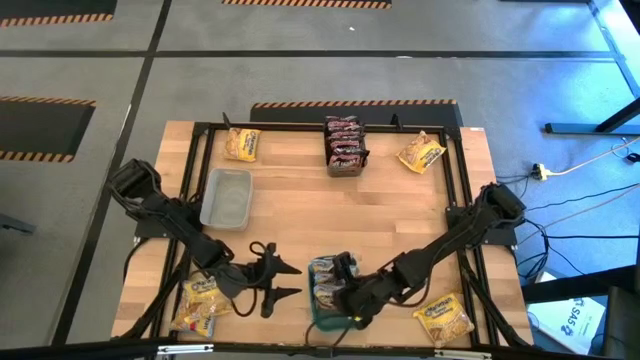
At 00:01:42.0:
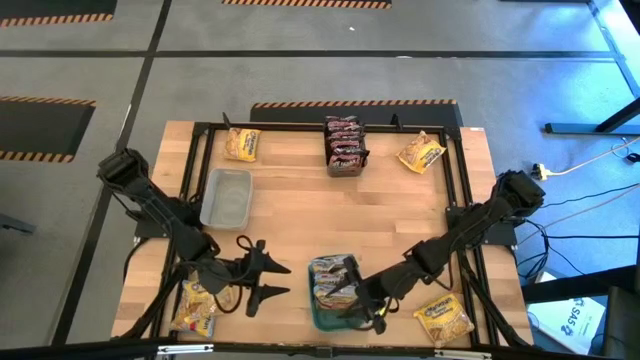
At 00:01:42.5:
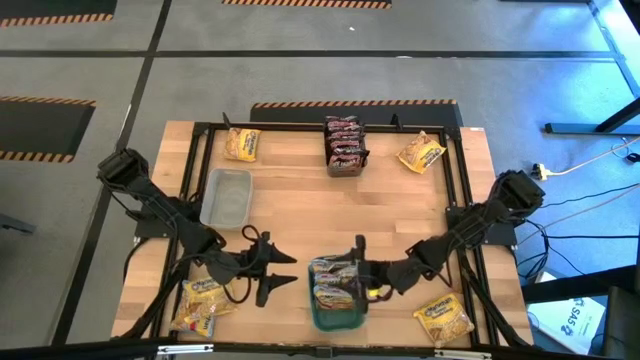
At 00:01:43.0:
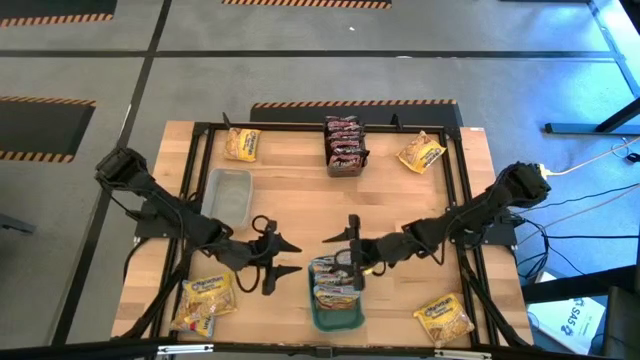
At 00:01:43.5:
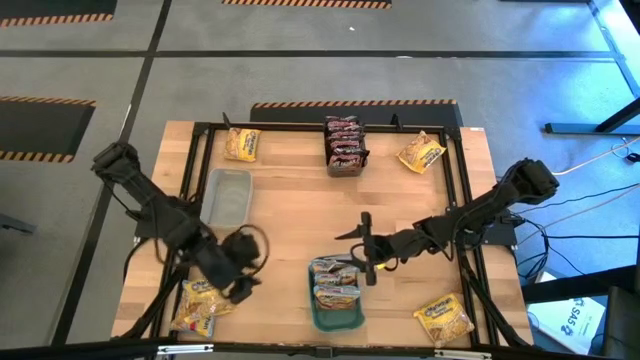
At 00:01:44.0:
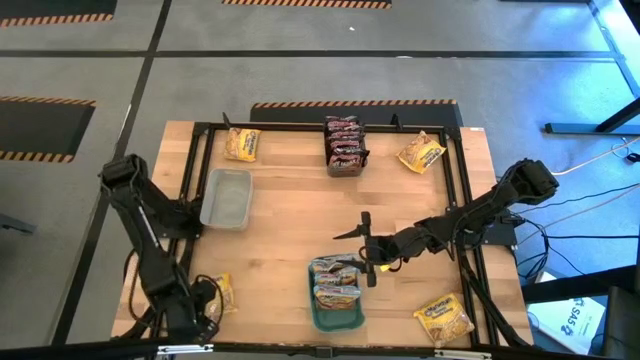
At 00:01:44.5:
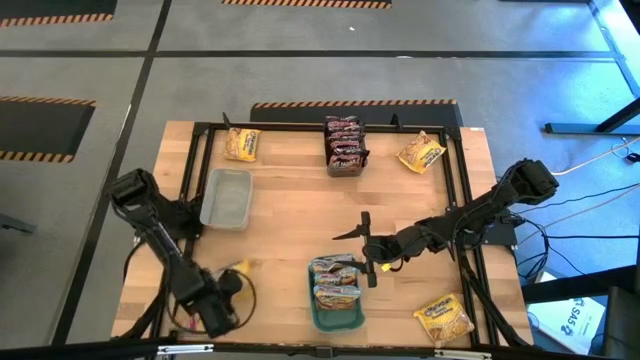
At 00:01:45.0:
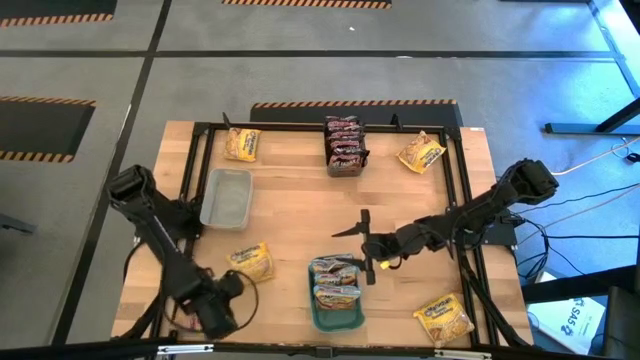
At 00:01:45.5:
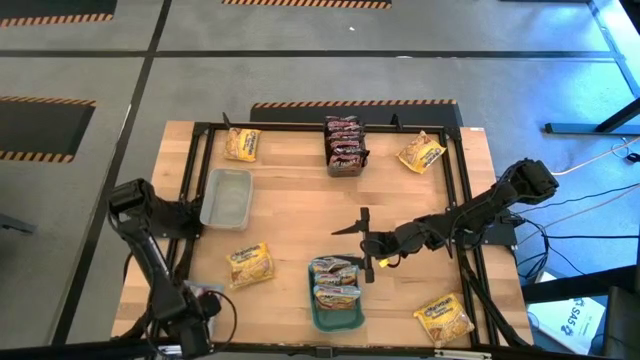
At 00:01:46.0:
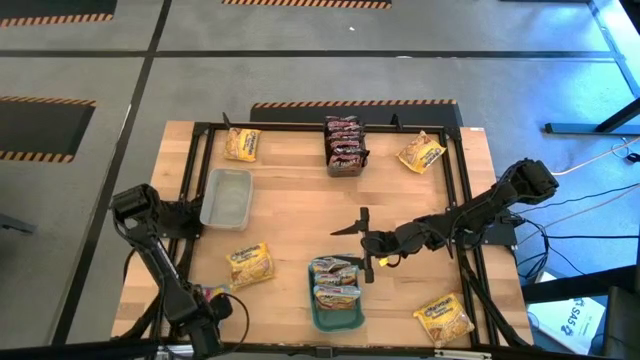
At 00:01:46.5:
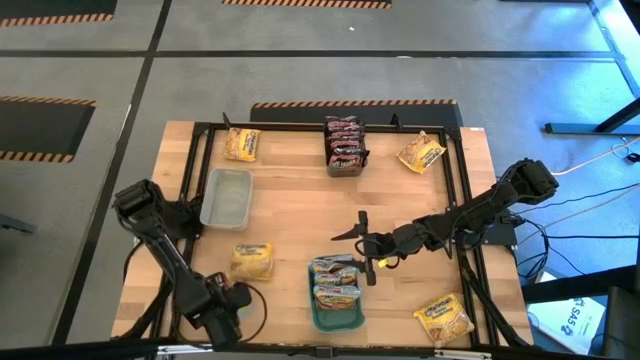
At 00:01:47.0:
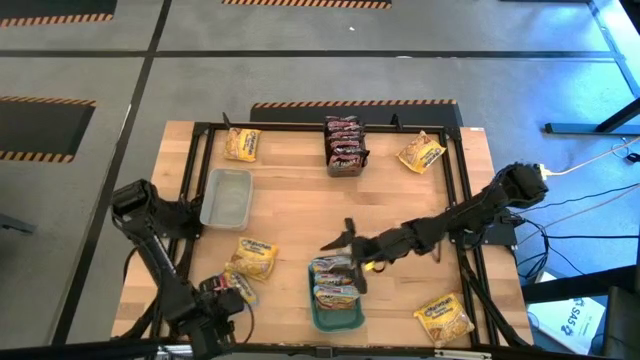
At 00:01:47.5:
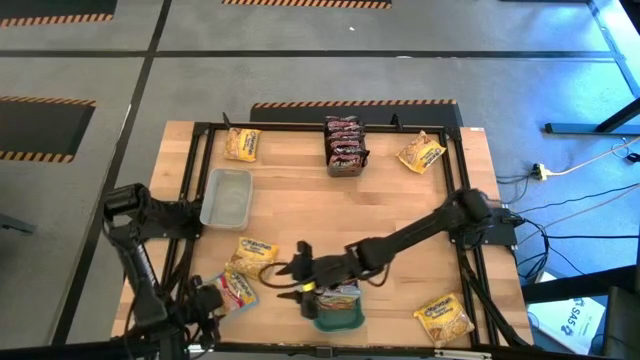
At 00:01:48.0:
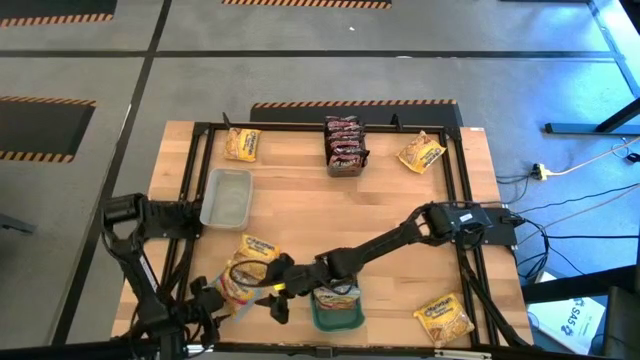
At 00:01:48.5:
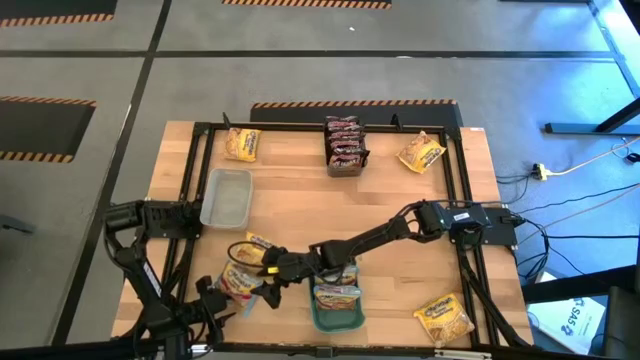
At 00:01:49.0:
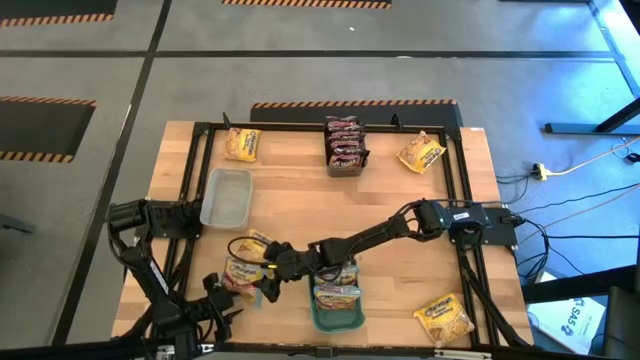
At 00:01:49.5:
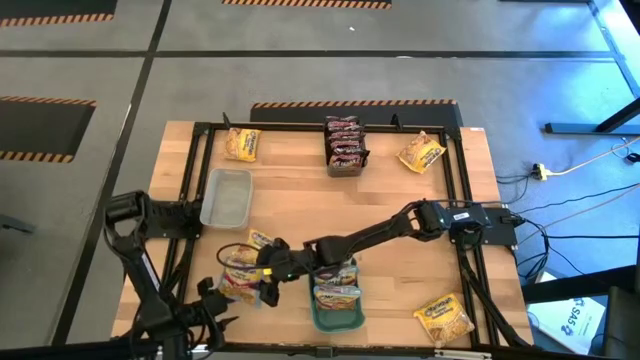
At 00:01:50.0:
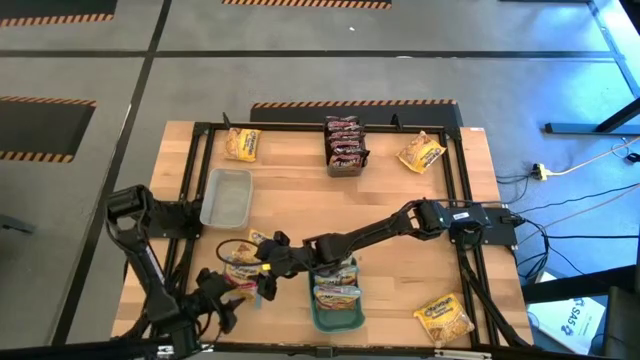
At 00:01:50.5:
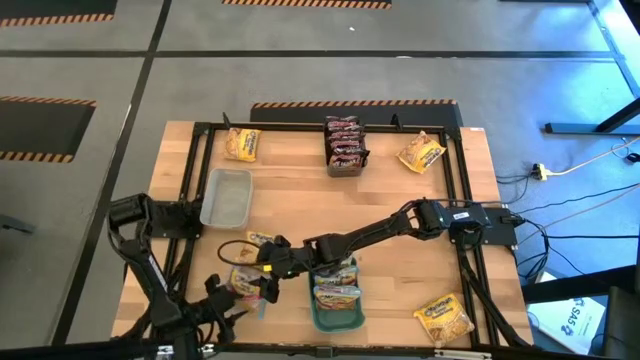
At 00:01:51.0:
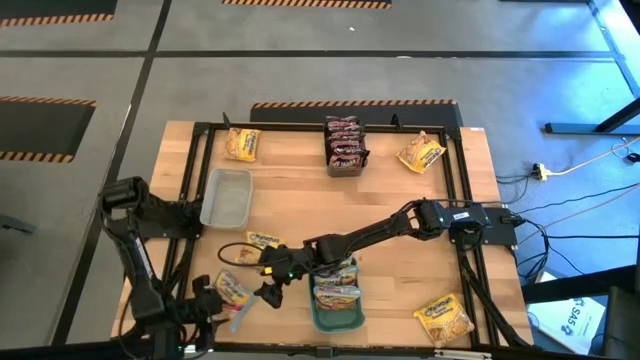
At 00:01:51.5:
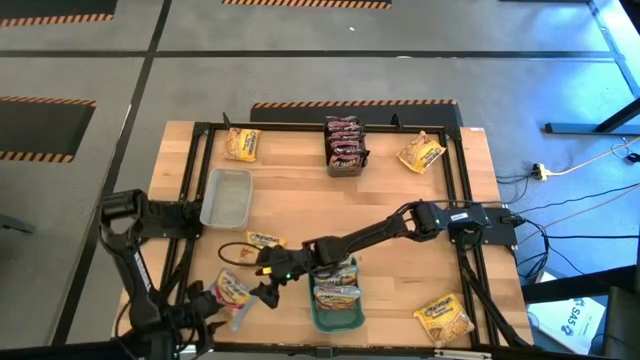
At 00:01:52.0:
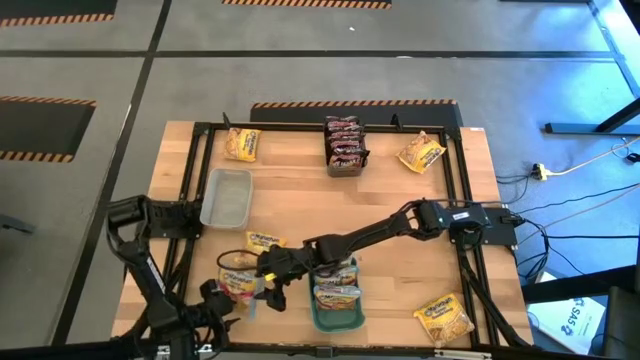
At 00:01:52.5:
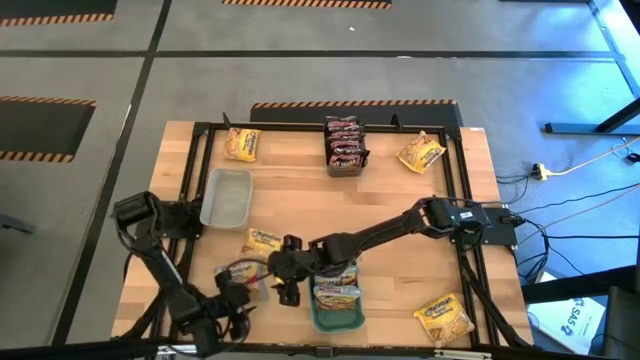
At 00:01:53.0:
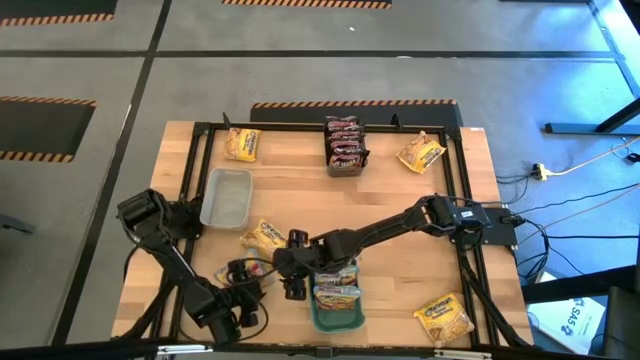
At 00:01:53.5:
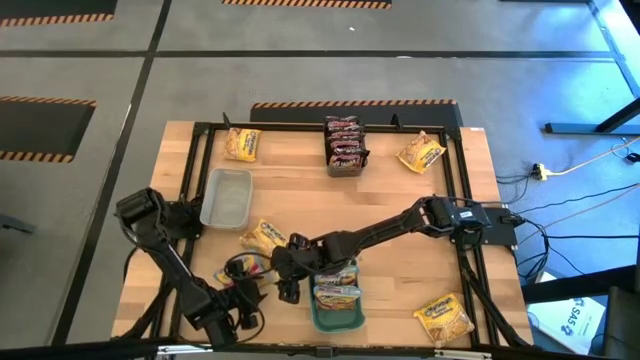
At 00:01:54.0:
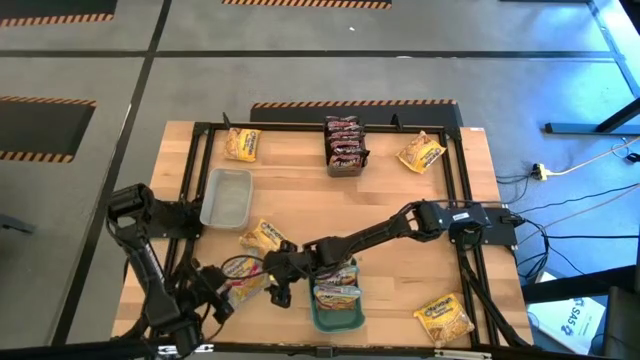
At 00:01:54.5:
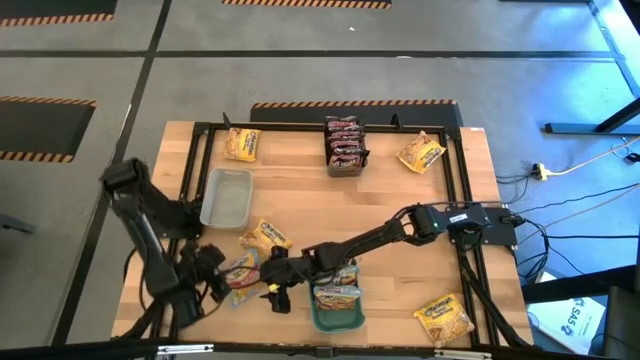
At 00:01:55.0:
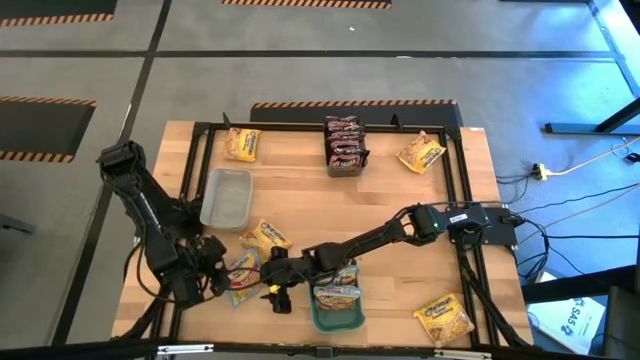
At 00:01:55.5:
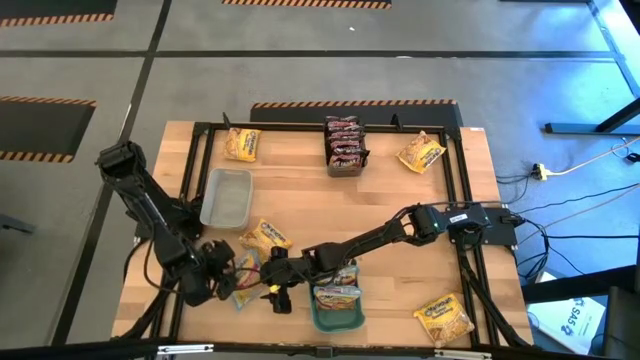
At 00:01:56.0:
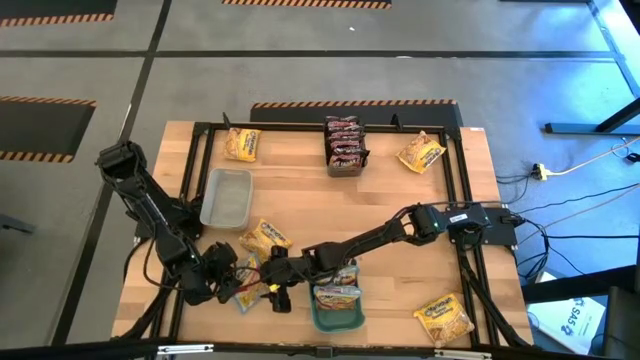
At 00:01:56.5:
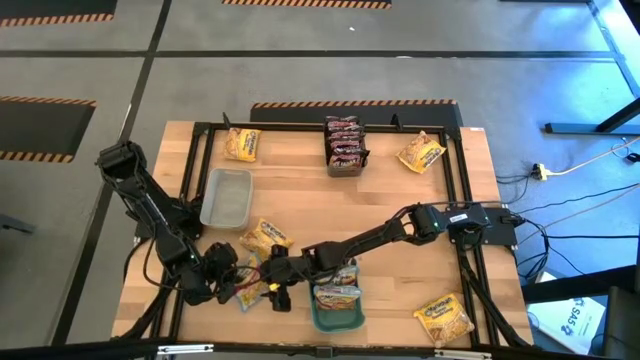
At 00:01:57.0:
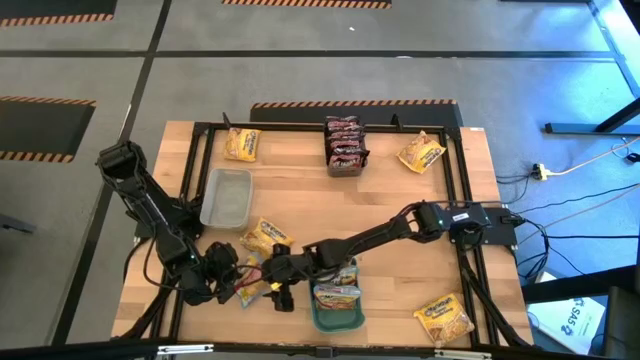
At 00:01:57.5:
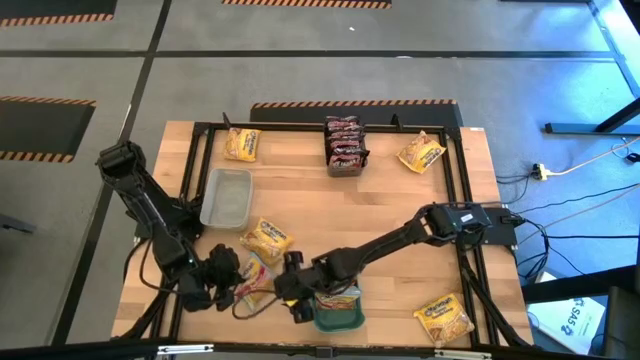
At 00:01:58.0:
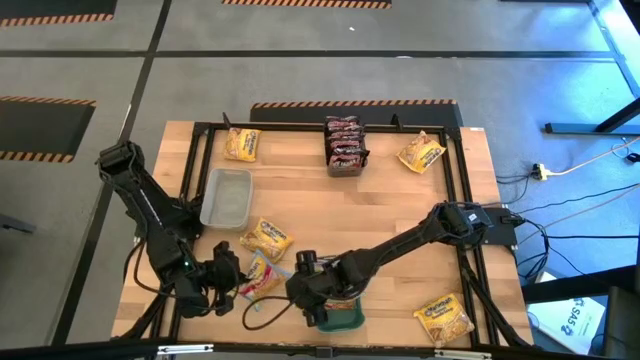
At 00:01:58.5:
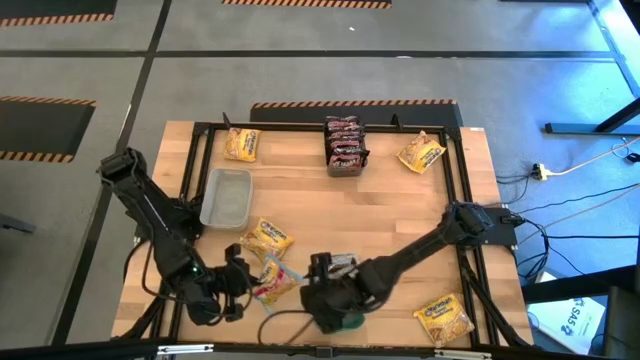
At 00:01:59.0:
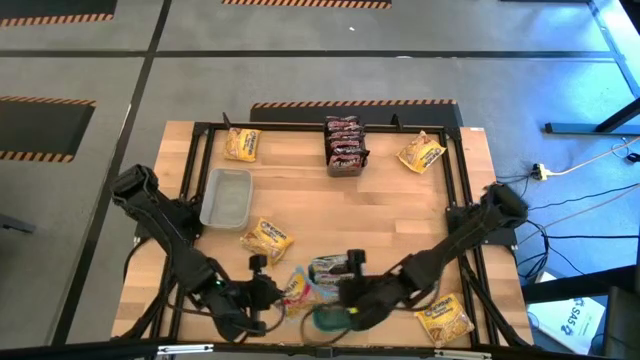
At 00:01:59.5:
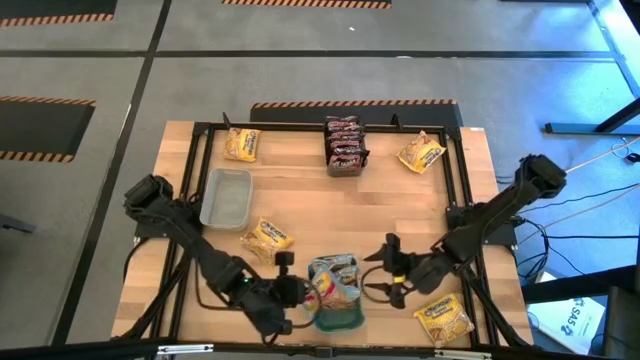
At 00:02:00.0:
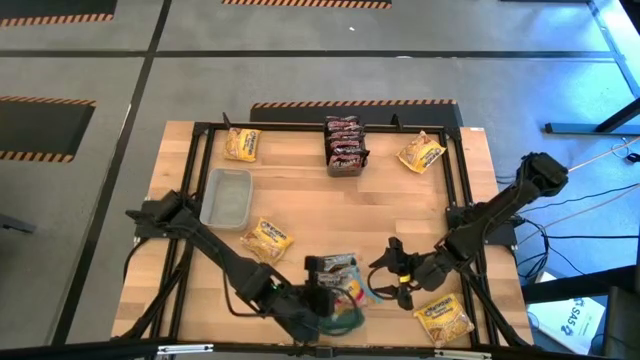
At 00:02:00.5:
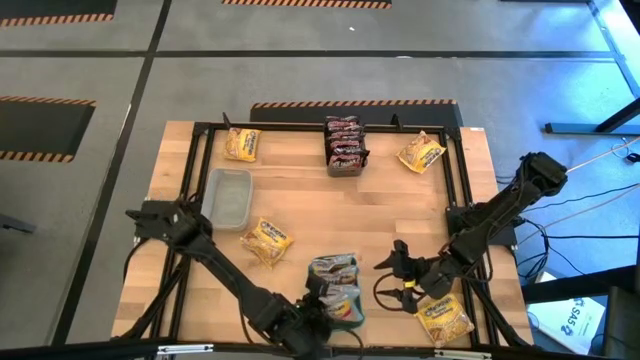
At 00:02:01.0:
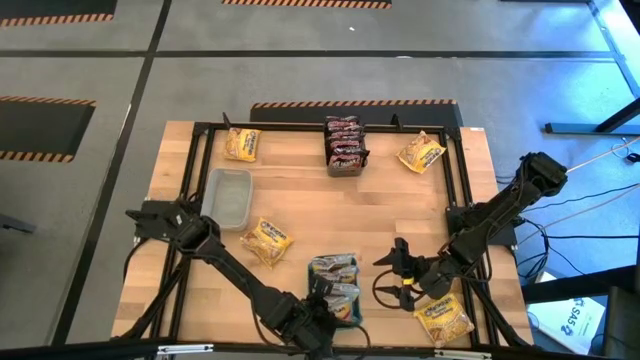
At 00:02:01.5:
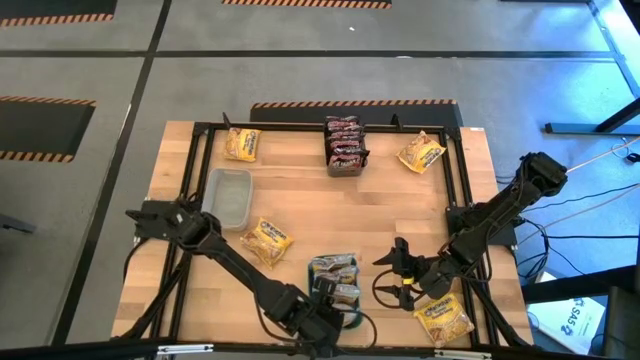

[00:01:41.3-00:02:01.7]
Task: Sort Maruchan noodles
Put the blue noodle pack into the blue bin
